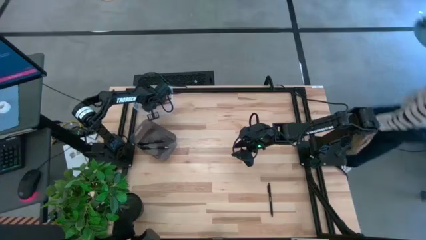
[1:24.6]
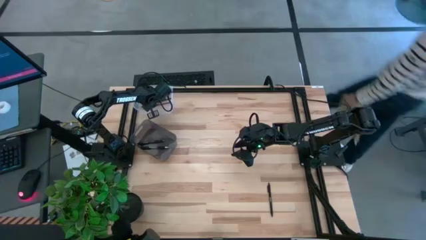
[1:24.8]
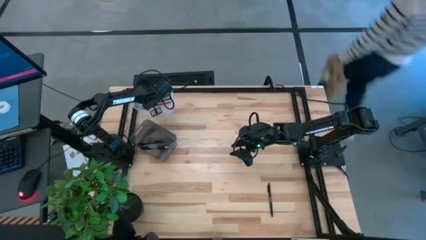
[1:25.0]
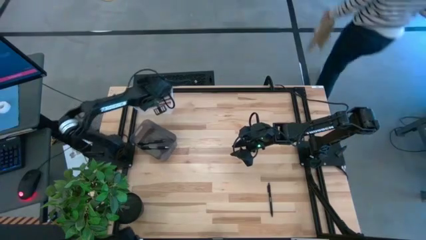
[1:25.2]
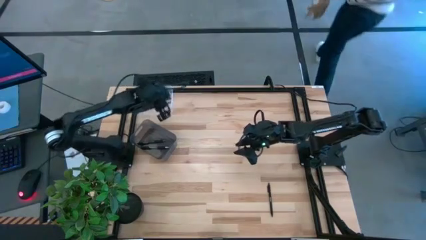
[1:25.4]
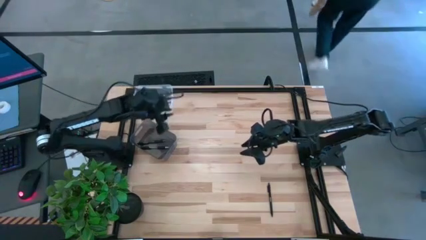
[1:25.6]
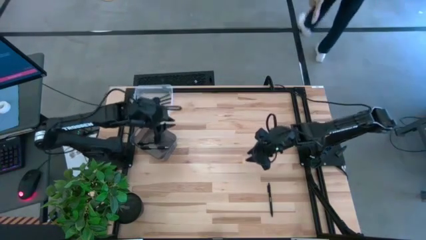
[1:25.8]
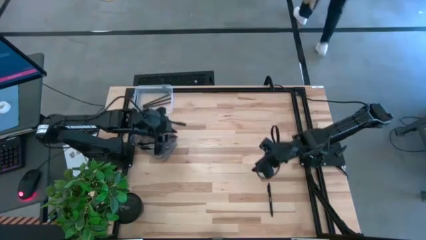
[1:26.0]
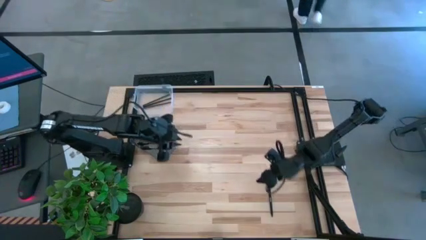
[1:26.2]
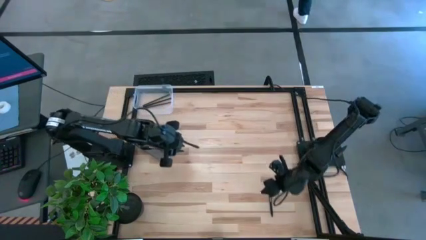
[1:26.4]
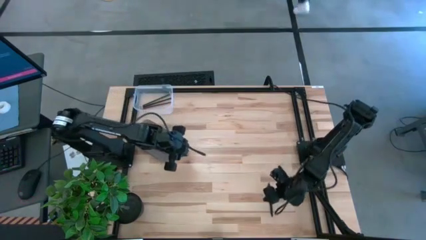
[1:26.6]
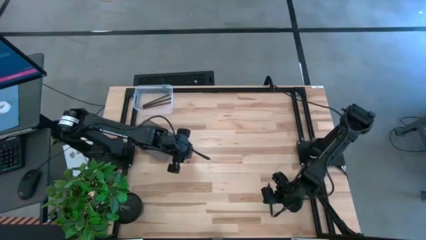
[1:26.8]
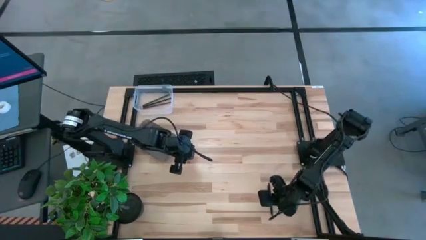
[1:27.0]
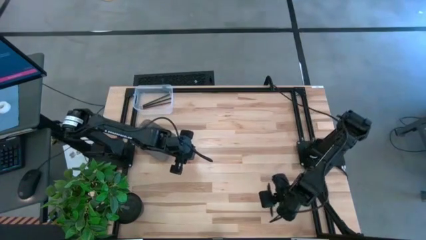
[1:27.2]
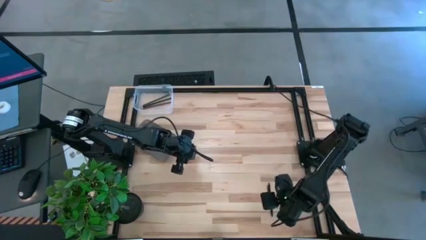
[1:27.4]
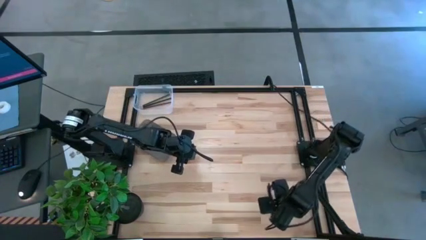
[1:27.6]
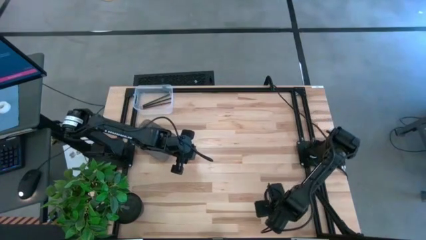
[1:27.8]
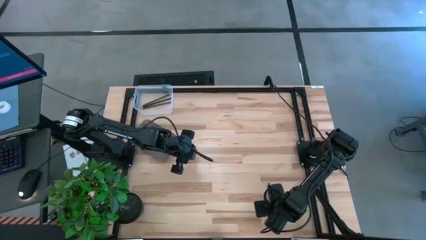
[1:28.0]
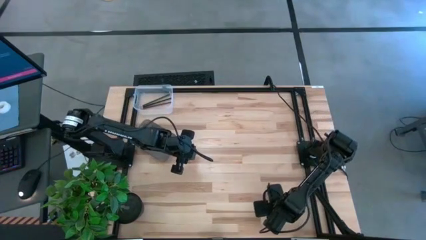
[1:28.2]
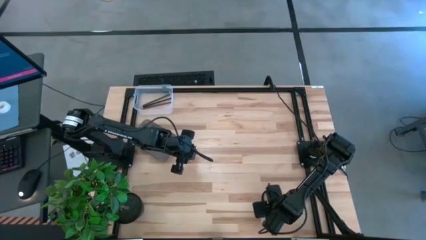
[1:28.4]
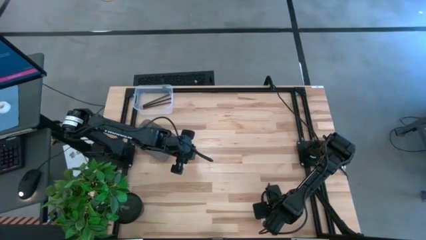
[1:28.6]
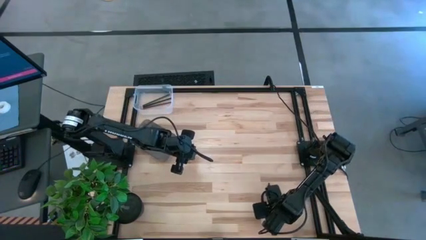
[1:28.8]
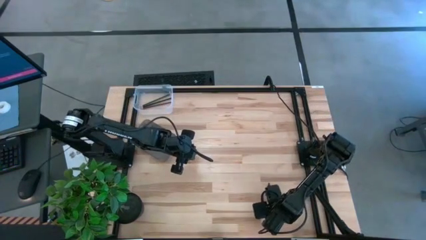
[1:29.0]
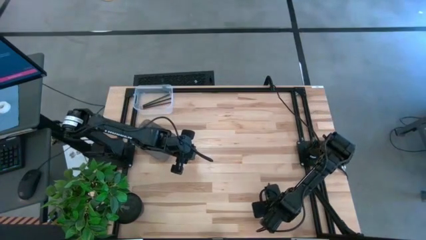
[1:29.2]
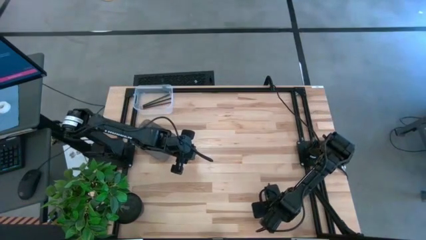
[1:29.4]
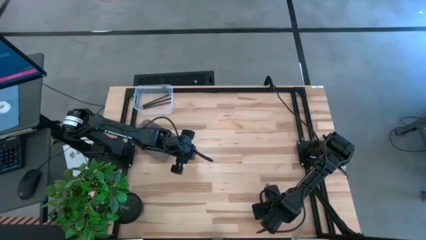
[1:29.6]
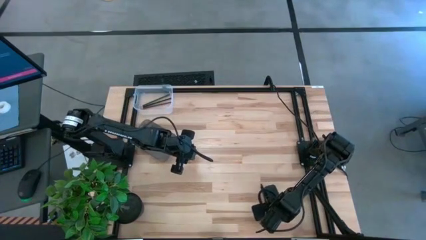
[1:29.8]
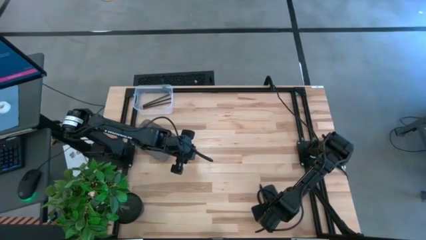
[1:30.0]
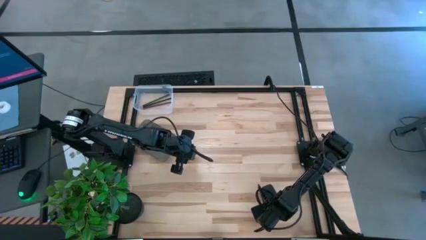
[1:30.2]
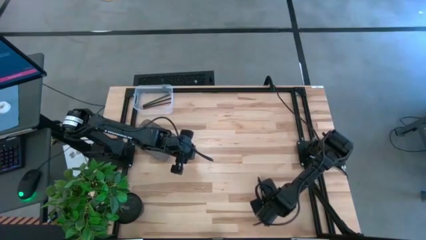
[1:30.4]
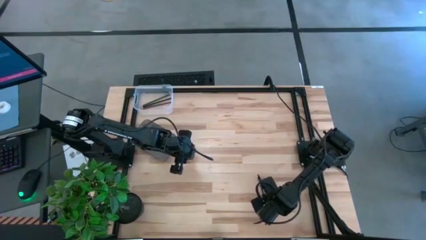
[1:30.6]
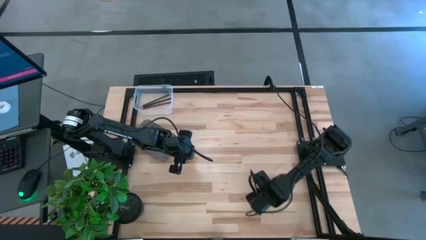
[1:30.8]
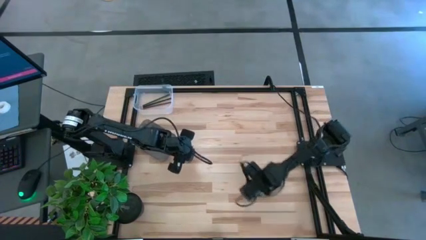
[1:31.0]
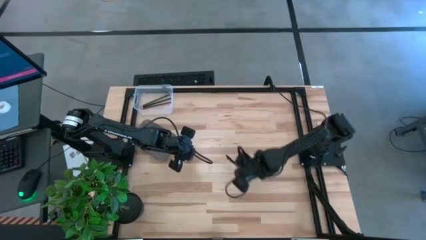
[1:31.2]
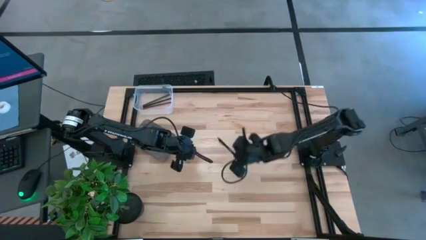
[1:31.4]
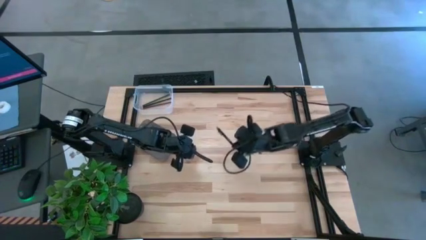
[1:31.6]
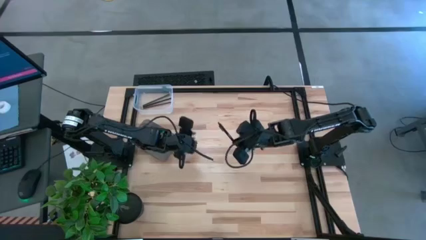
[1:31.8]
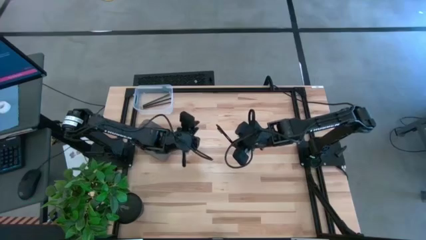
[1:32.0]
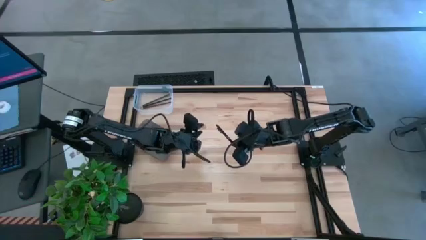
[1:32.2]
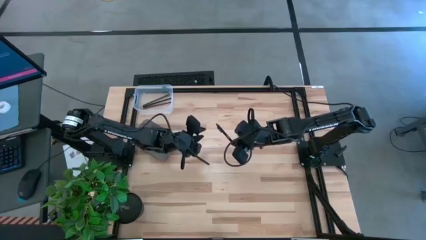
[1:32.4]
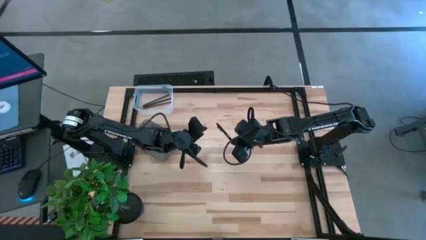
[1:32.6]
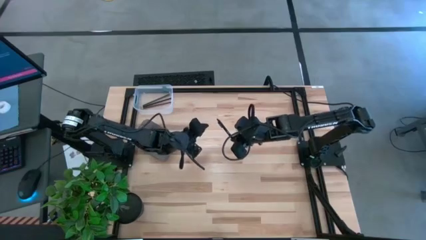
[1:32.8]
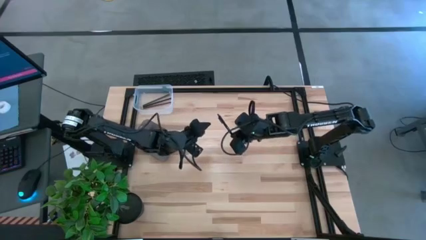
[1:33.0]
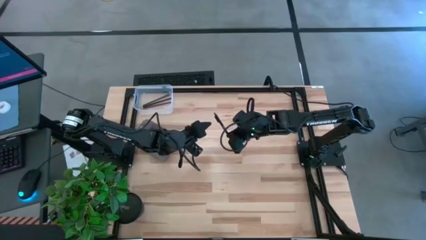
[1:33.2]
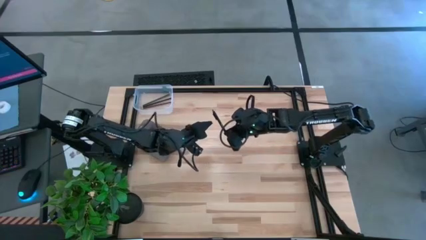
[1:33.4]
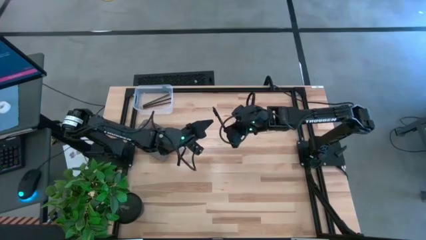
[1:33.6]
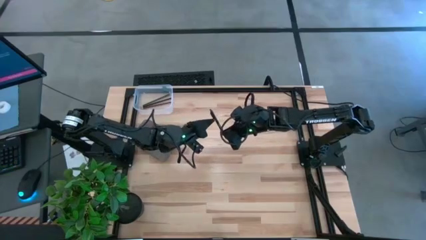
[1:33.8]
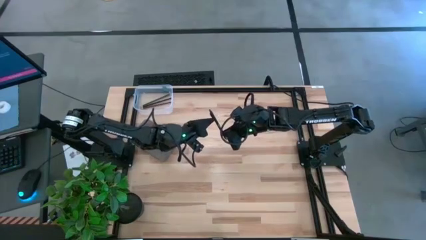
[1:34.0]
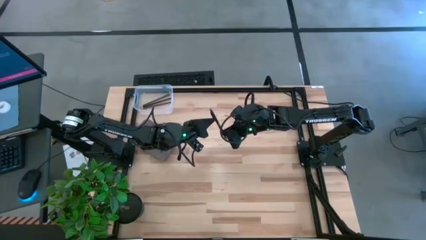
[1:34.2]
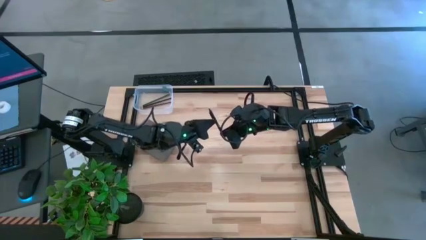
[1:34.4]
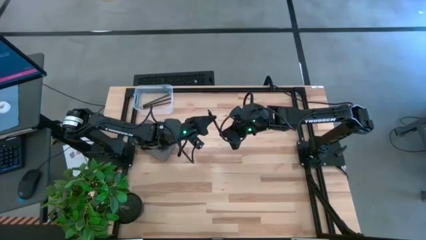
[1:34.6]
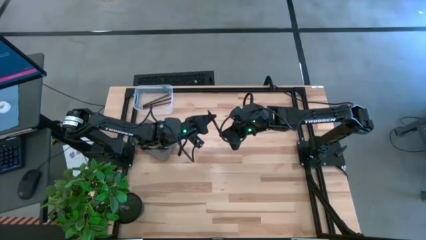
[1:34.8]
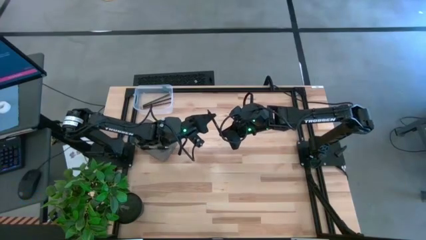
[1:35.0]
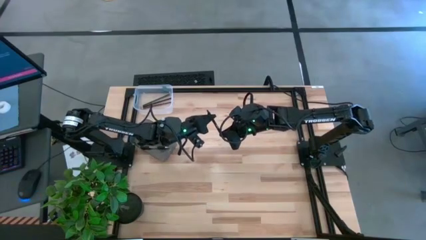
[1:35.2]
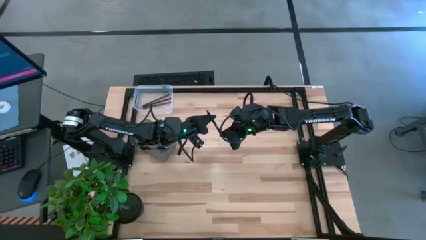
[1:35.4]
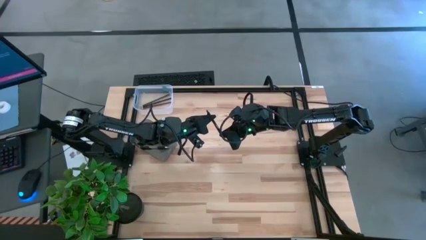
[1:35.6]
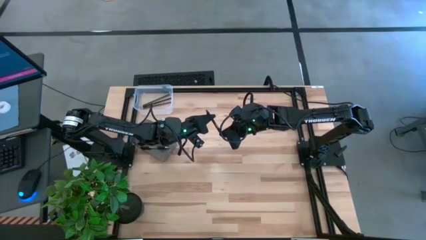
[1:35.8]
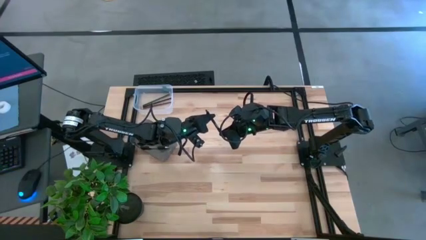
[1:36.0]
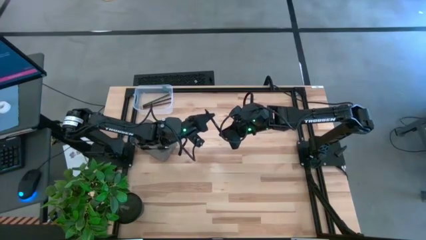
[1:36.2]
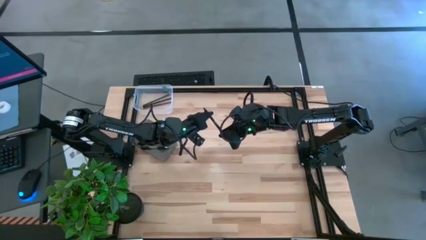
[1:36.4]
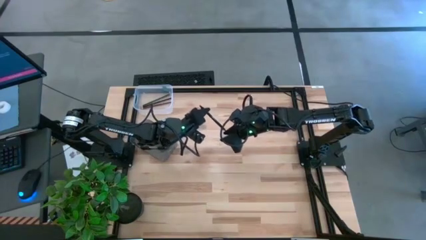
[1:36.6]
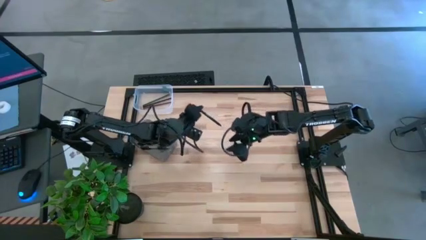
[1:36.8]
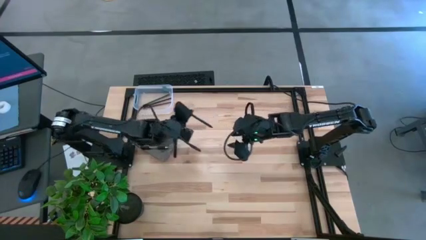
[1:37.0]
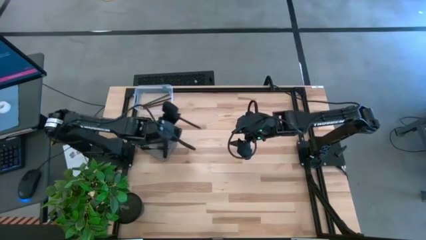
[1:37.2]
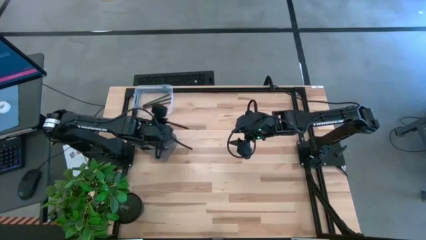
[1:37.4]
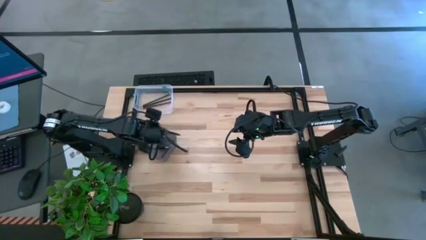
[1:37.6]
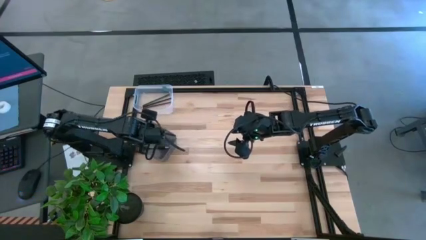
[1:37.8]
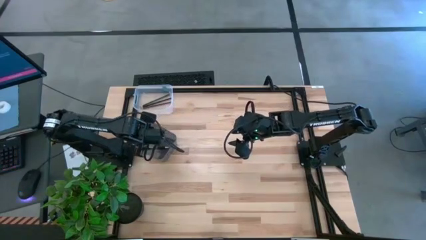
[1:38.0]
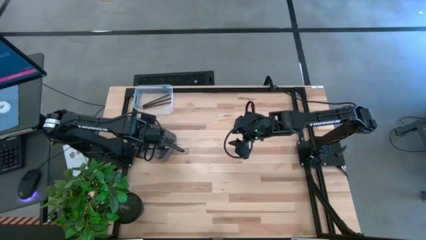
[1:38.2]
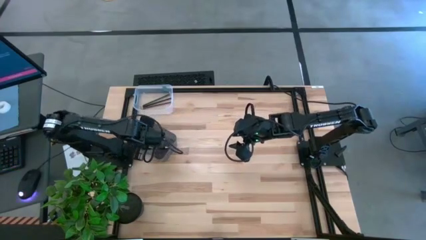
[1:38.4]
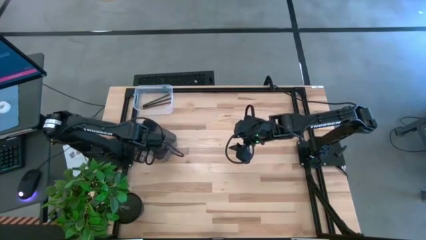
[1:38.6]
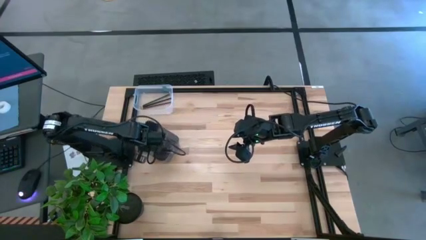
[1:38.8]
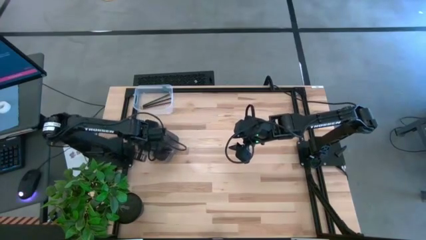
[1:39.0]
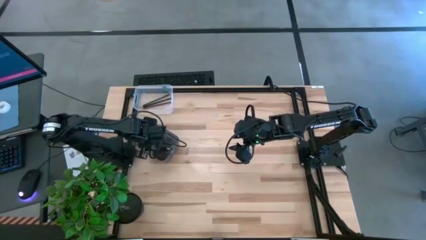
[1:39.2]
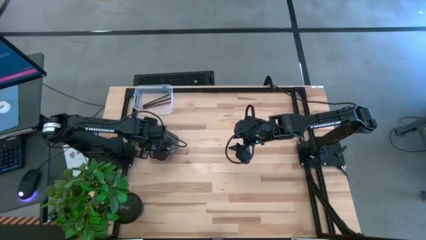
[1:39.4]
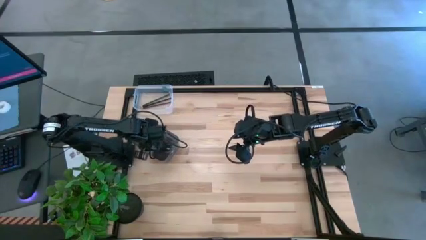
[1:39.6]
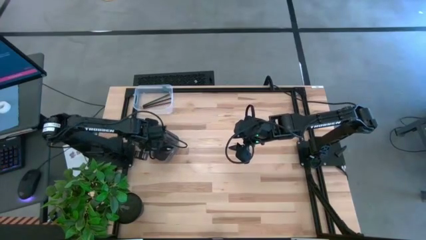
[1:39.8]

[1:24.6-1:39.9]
Task: Sort pens & pencils
Put the black pen into the black bin

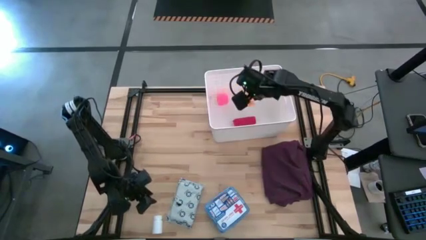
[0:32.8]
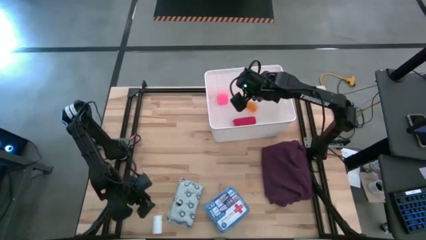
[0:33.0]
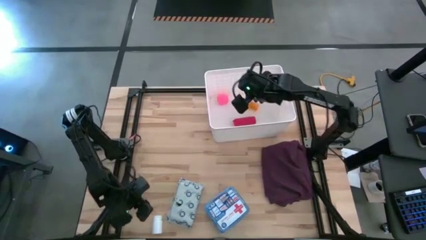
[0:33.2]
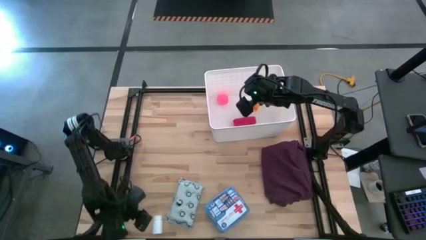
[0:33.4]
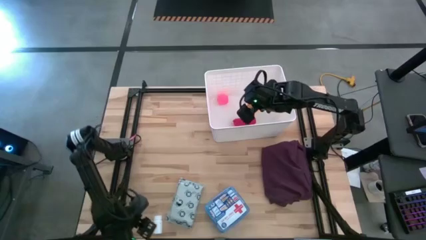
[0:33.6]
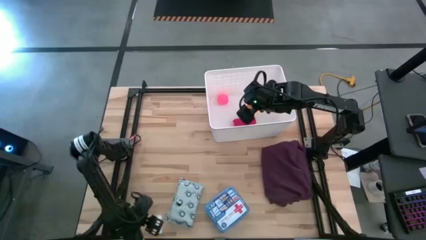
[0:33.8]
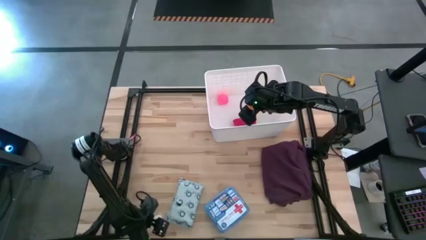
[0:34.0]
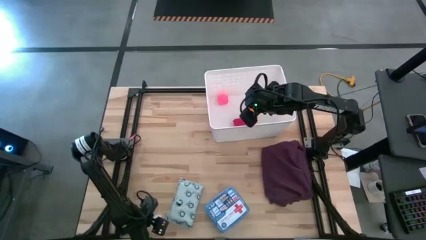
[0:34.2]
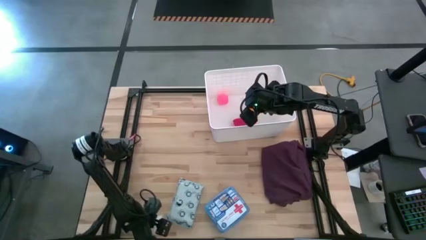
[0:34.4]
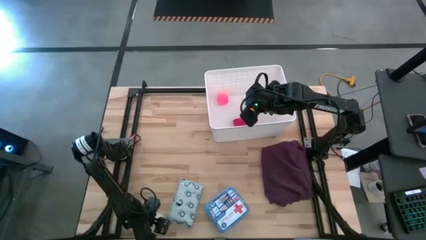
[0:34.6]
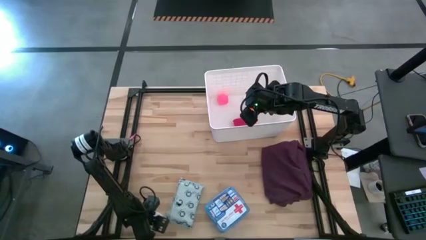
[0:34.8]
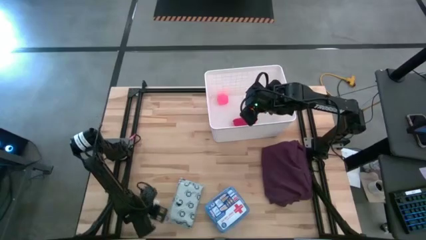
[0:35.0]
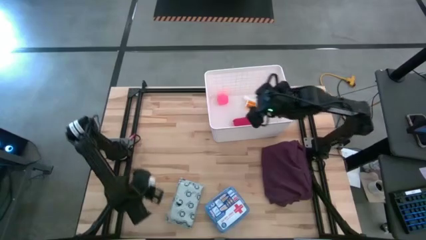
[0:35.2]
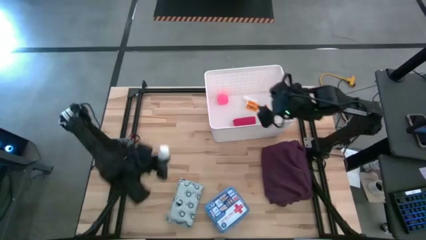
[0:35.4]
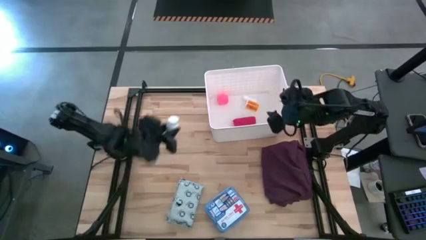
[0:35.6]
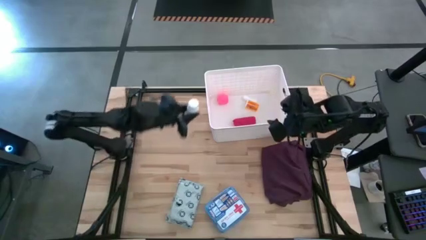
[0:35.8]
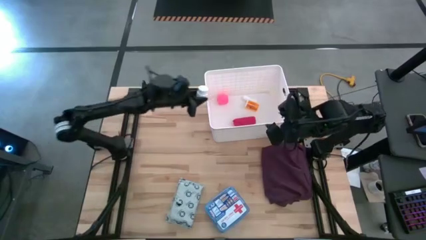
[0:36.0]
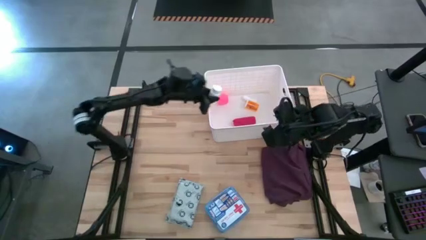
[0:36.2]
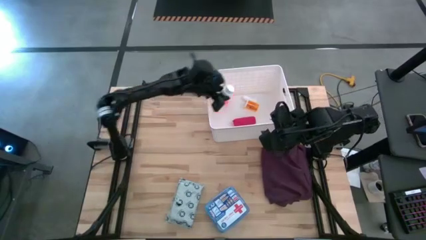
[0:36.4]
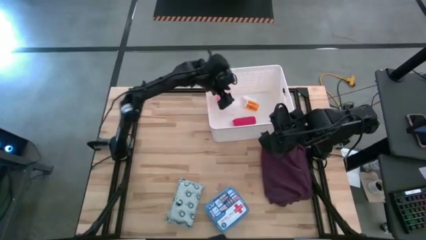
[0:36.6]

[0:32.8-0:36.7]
Task: Pick & place medical supplies in basket/bin
Put the white pill bottle into the white bin
